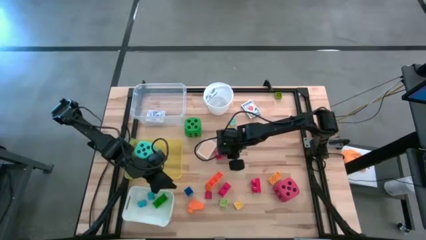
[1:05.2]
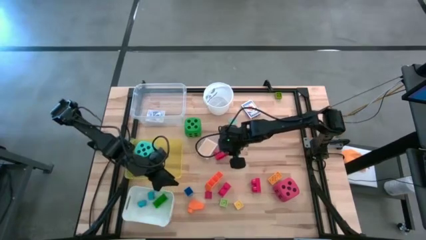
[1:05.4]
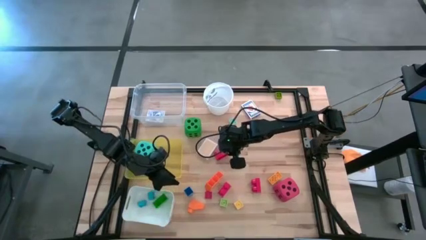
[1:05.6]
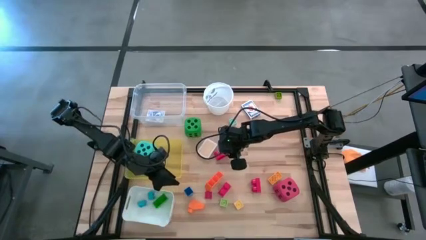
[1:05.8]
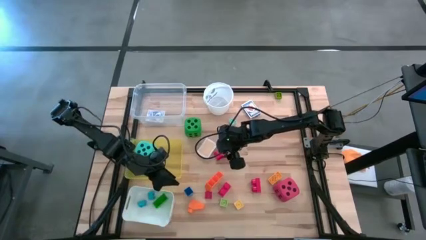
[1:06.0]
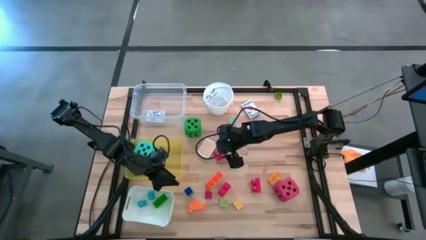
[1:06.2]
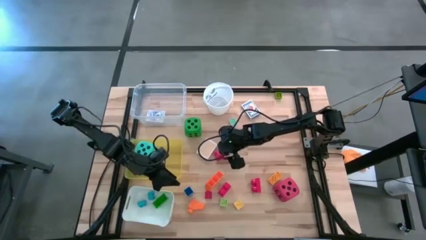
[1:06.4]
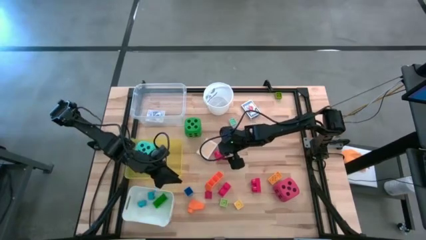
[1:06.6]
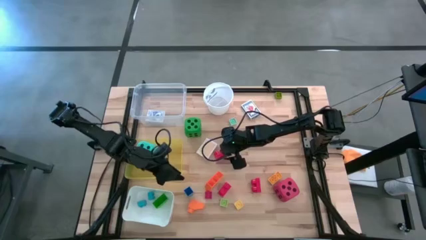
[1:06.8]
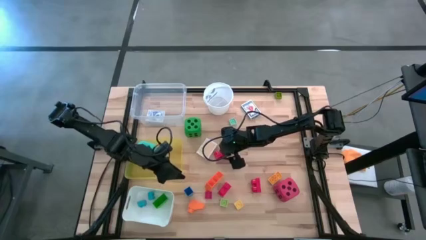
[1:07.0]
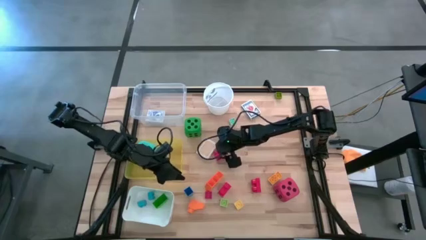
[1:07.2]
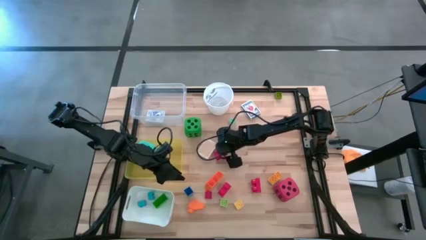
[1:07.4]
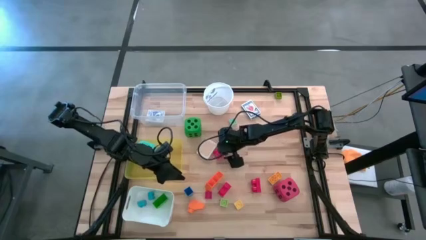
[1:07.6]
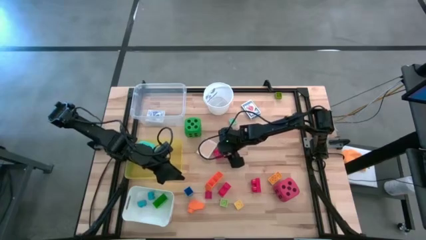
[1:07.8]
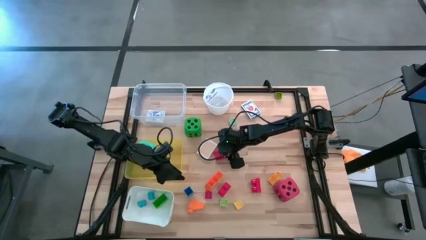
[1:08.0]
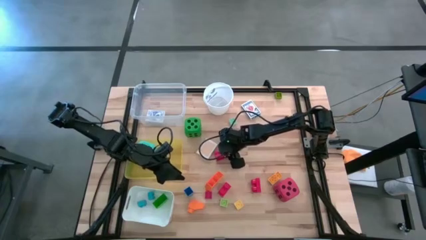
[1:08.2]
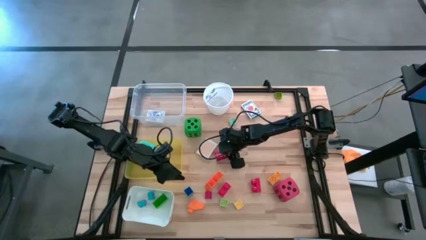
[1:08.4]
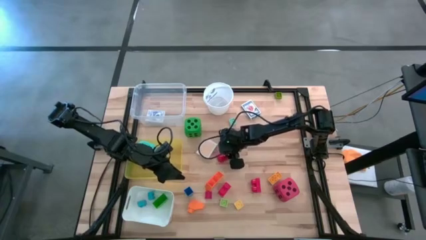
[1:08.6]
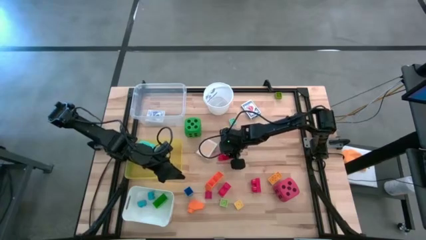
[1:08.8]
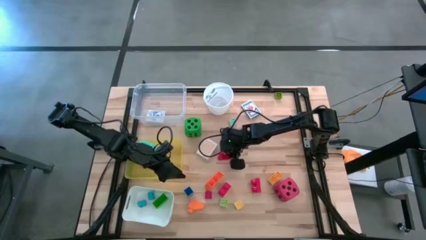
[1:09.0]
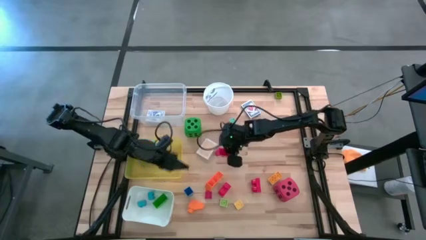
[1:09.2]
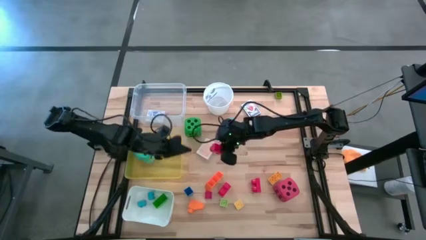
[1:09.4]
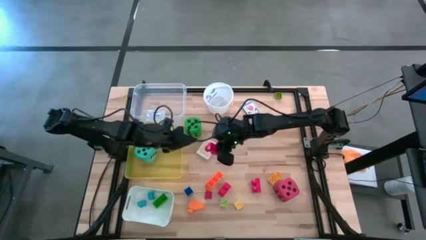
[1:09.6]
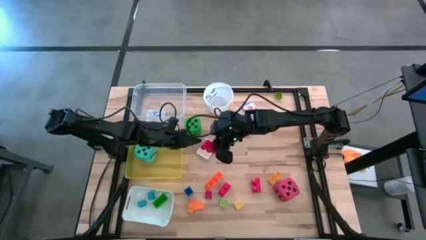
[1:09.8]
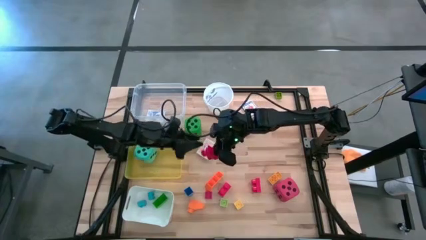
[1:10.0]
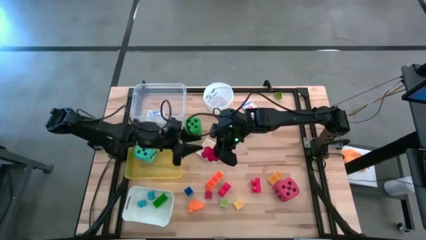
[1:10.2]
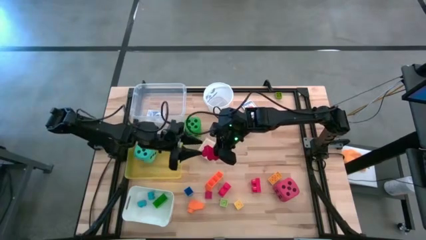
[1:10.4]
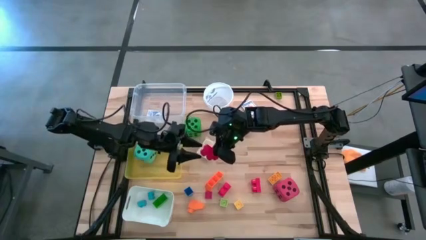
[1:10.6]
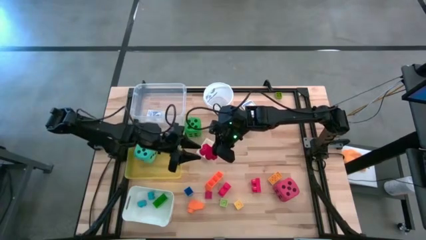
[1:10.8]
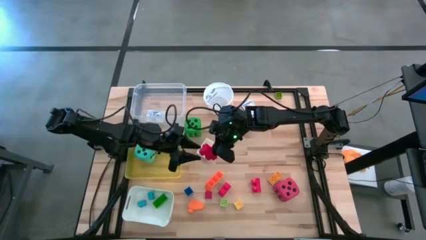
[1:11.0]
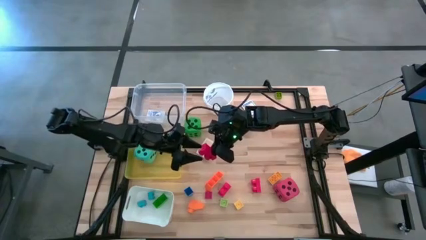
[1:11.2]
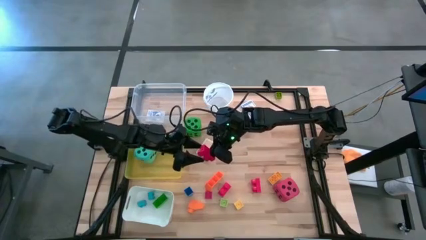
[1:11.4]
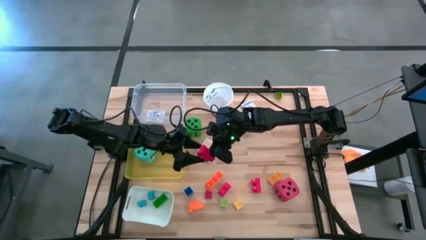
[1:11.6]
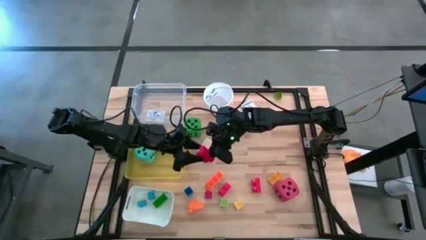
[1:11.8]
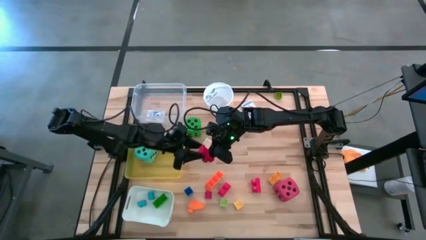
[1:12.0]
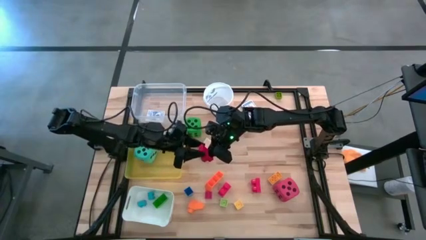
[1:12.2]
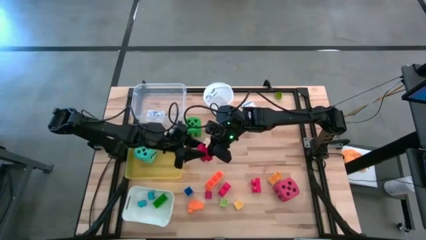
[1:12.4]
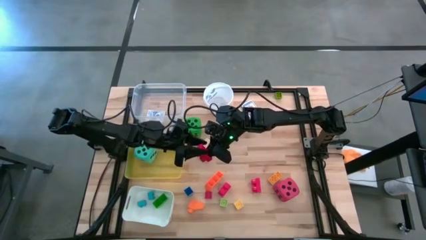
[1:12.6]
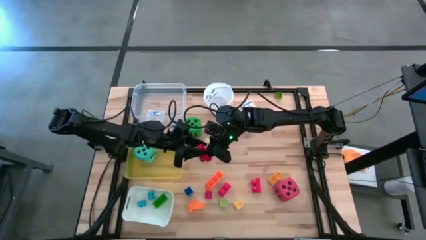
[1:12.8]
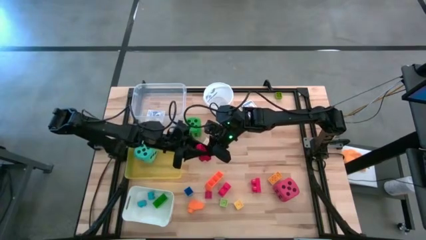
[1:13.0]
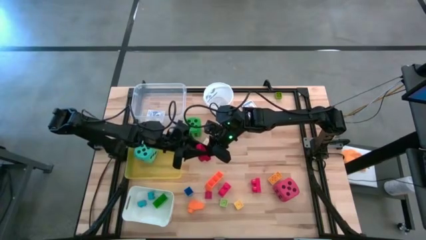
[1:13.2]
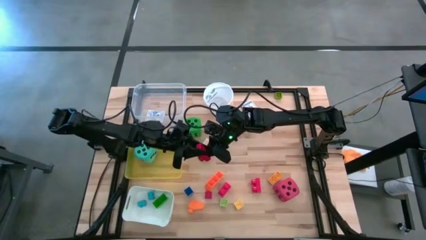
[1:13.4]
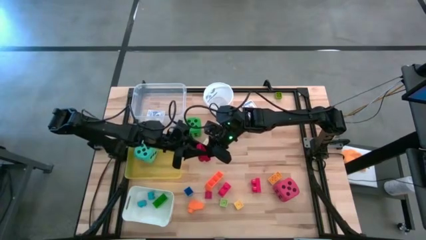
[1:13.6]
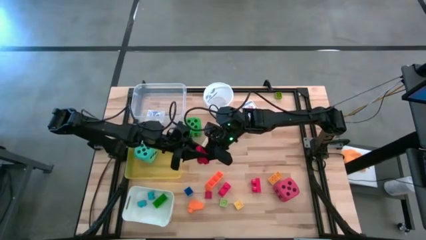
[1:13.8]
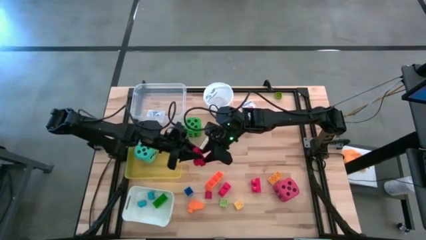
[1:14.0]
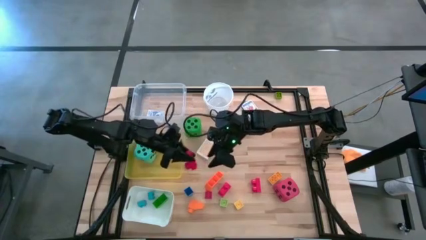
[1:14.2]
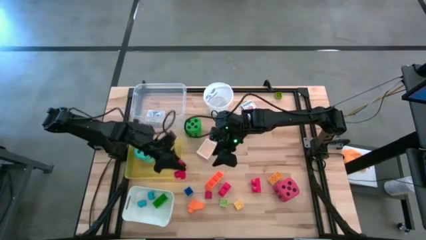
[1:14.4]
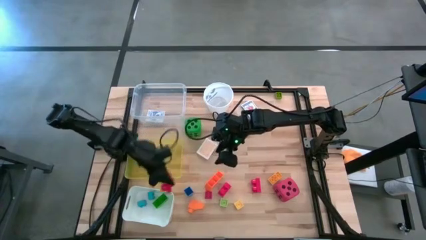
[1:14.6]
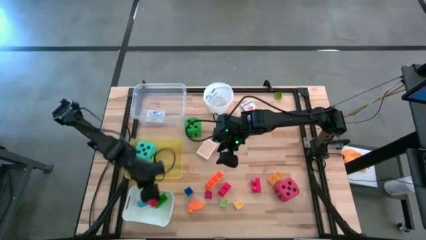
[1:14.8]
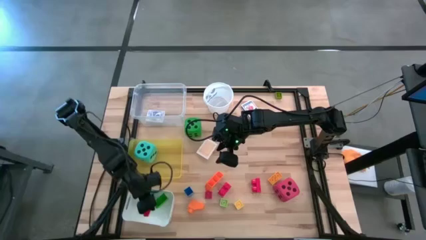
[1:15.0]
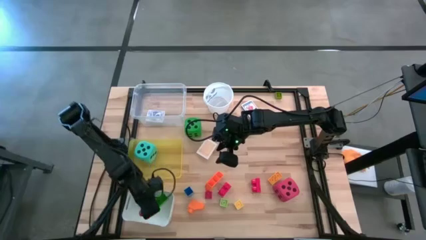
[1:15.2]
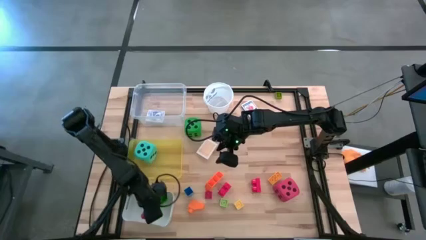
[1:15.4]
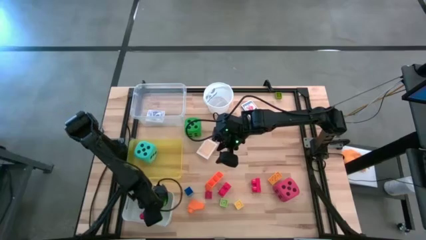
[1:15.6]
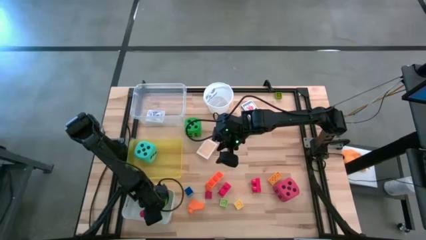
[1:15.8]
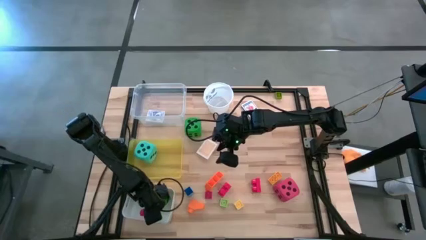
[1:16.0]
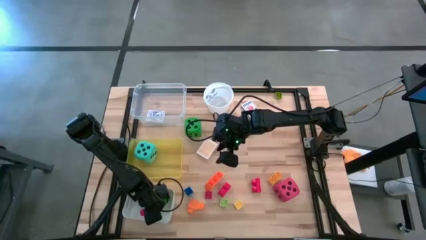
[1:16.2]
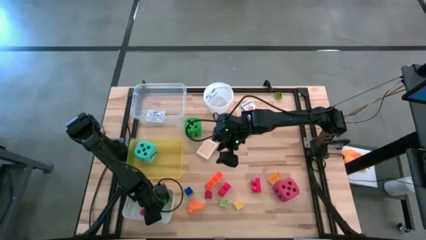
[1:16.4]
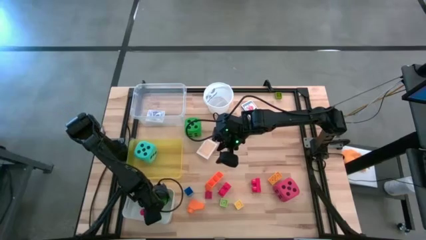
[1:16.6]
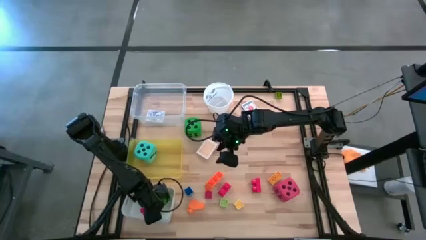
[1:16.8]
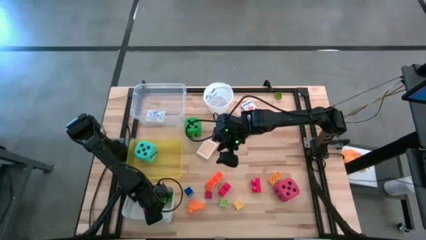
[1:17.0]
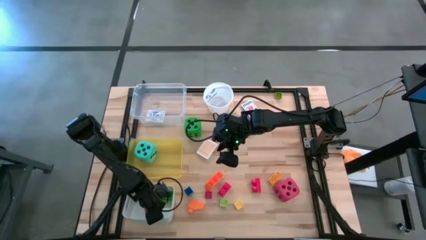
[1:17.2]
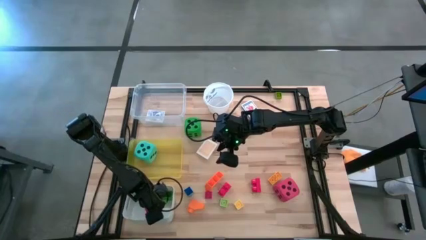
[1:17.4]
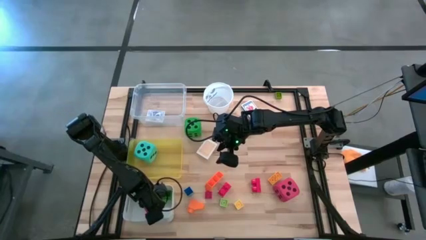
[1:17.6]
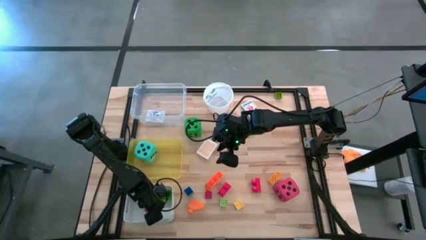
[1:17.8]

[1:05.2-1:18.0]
Task: Pick & Place Toys
Put the top red game piece into the white bin

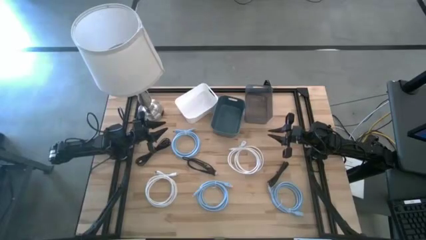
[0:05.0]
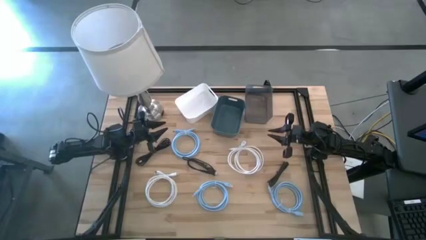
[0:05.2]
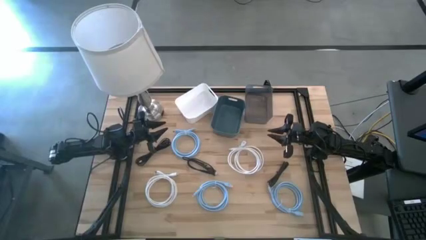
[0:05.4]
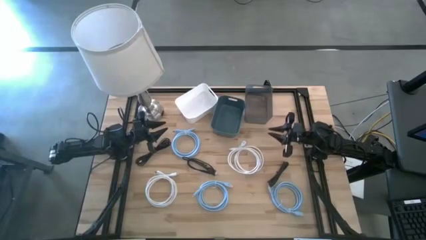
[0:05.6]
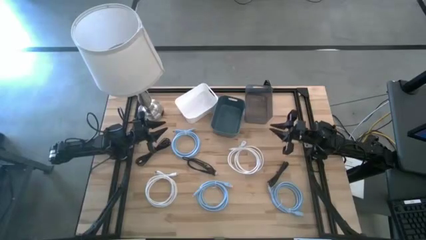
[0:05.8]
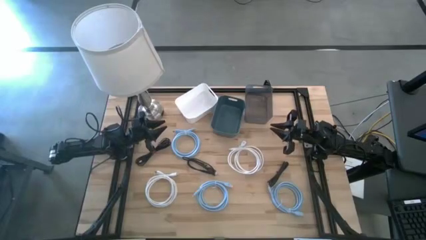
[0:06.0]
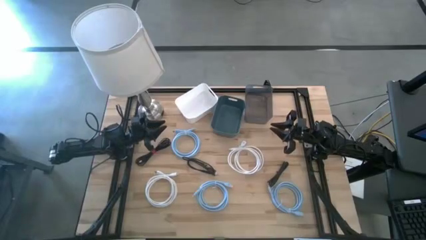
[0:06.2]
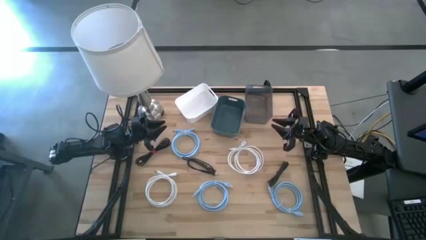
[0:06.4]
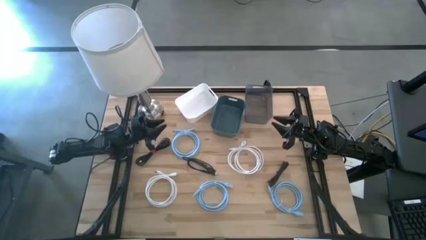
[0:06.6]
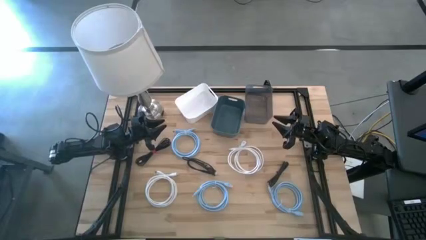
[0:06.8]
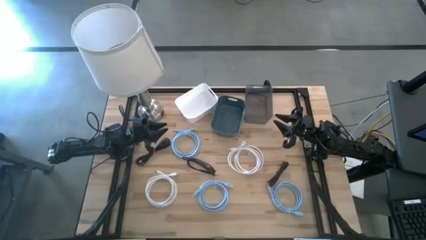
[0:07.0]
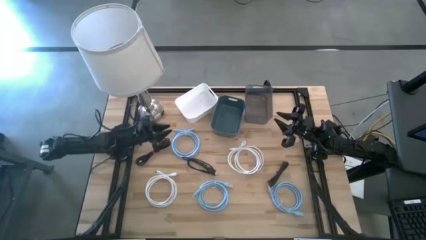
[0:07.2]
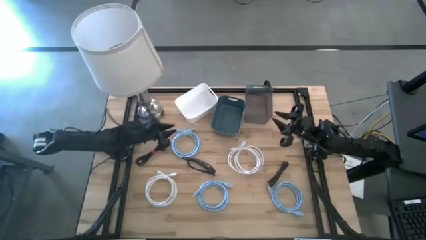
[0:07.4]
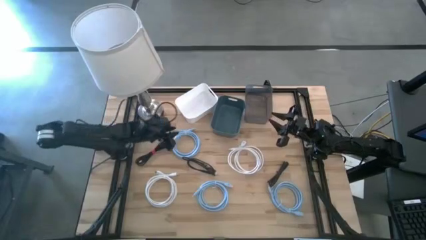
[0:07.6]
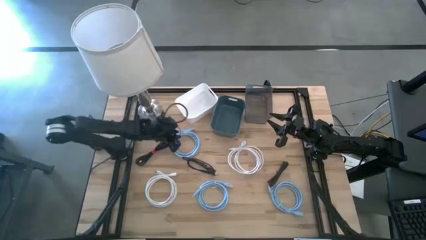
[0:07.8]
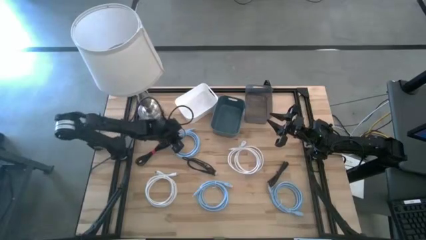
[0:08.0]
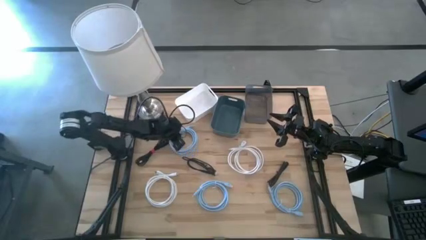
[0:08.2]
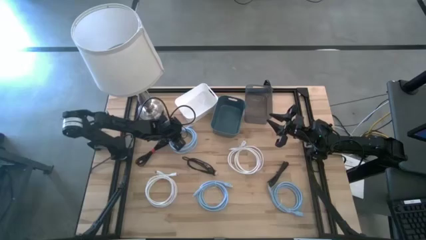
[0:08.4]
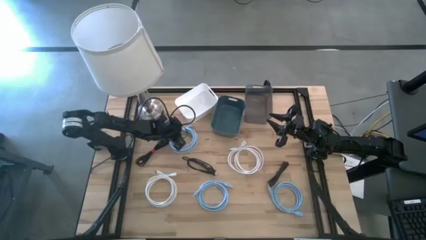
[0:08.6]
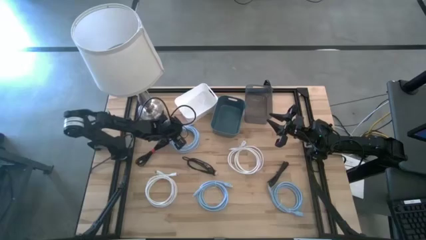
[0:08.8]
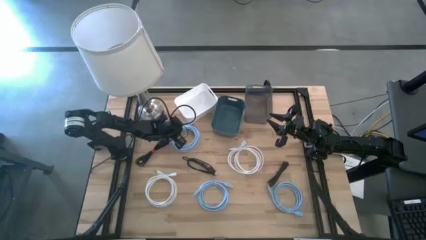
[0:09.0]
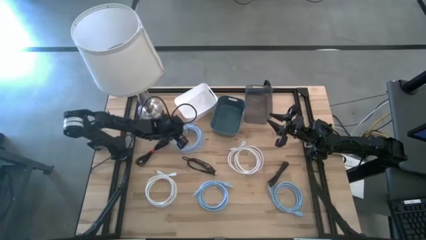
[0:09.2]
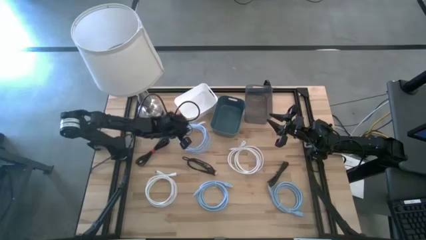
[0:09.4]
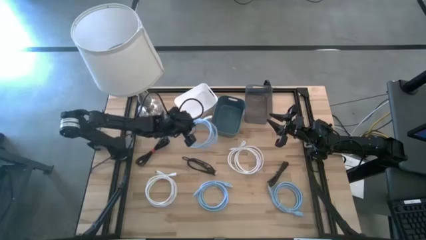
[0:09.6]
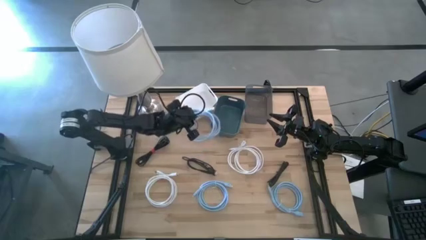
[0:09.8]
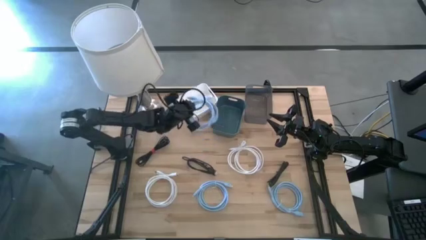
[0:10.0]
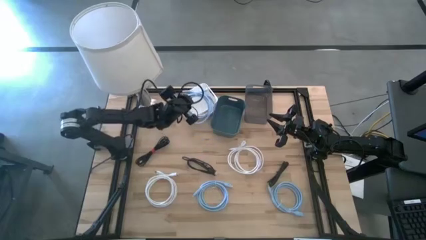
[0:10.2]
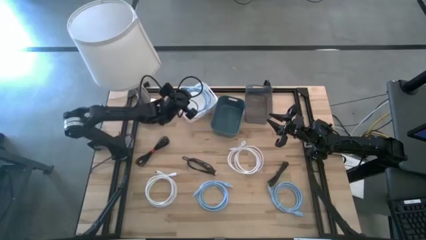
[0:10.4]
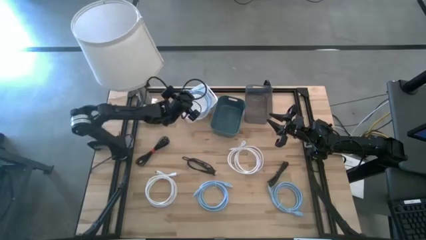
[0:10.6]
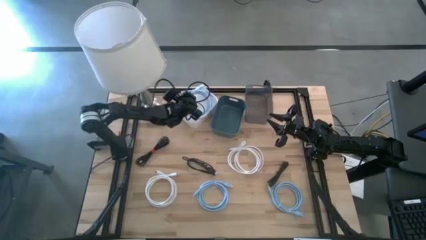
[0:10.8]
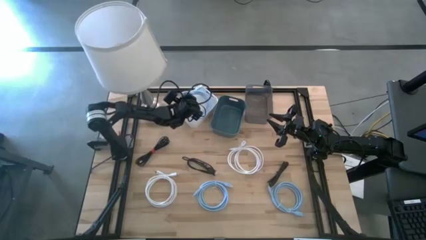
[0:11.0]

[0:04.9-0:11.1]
Task: Pick & Place USB Port
Put the top blue cable into the white bin
